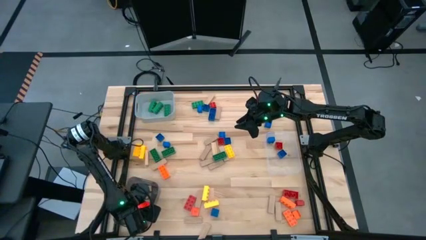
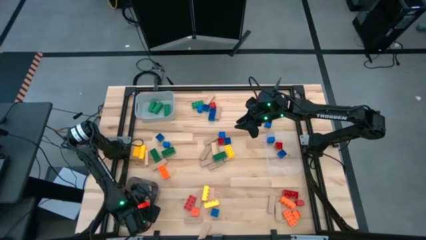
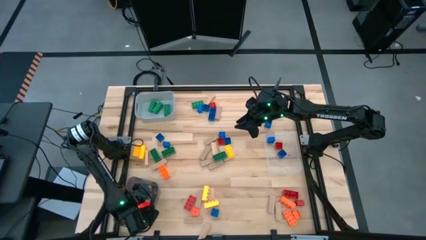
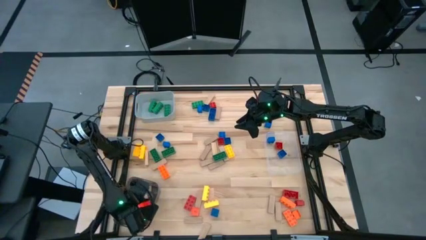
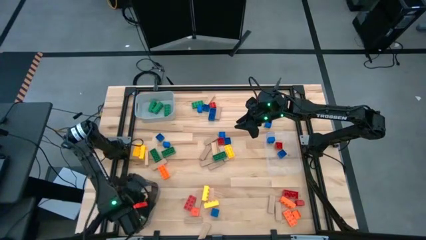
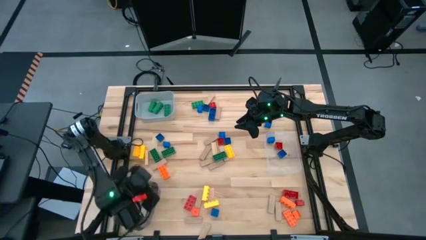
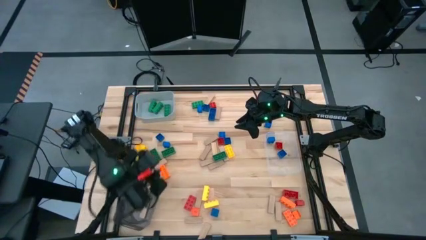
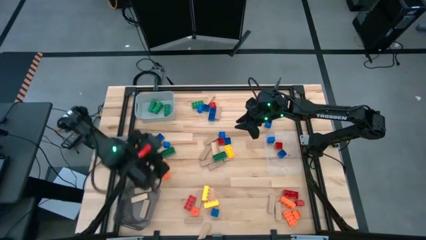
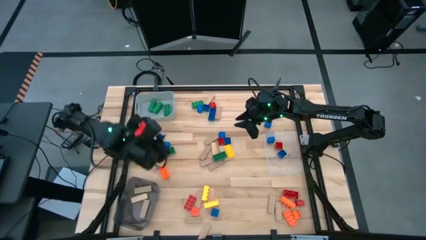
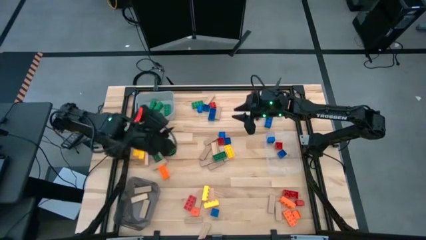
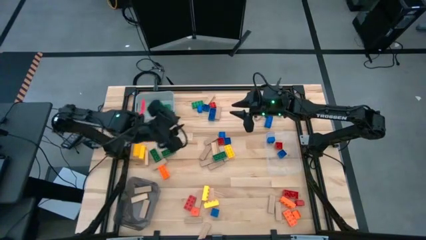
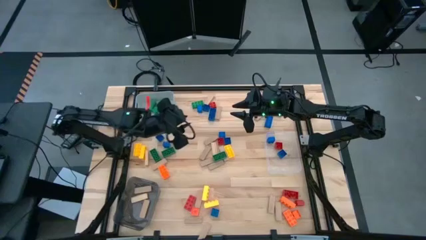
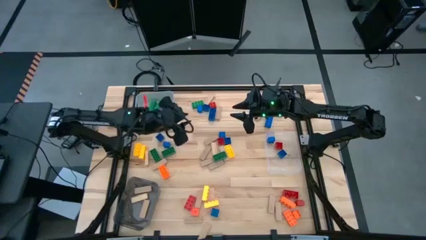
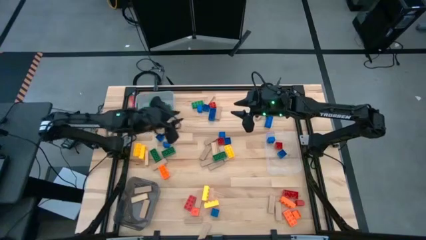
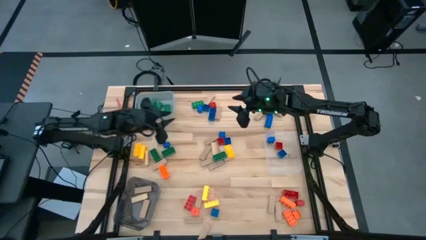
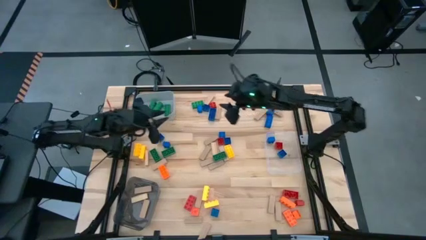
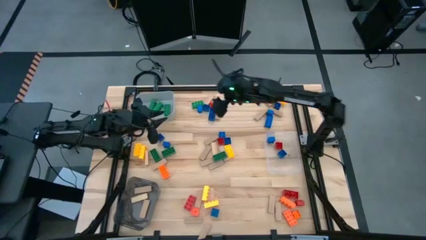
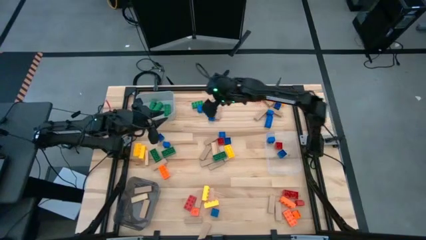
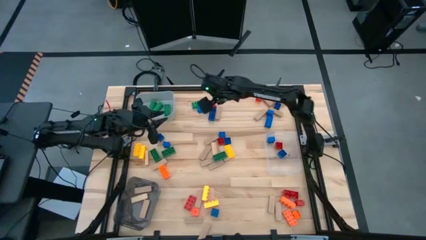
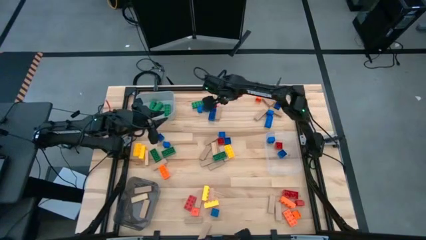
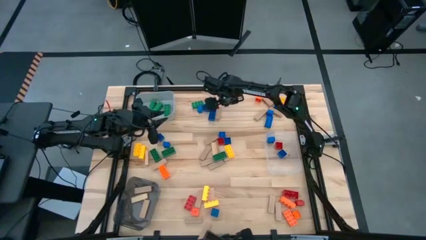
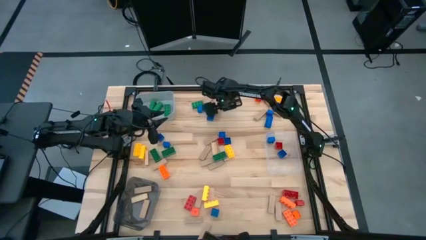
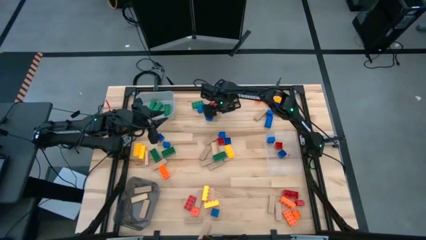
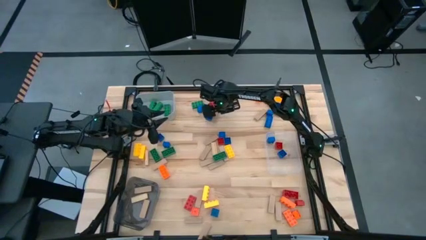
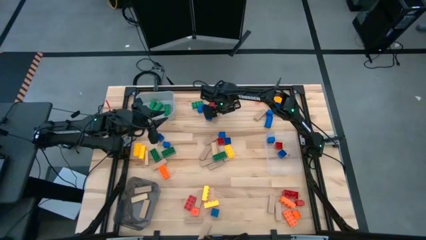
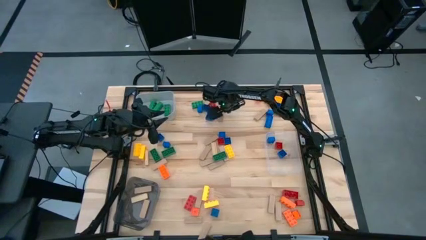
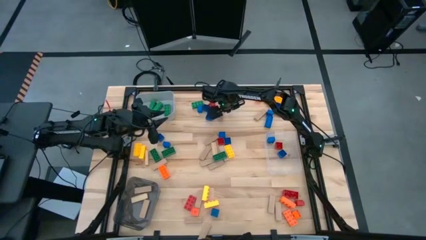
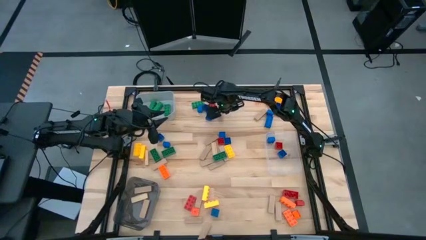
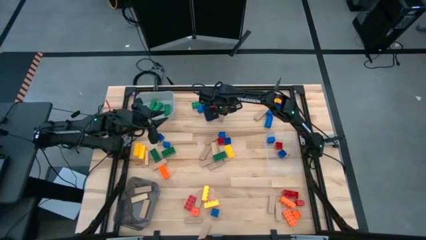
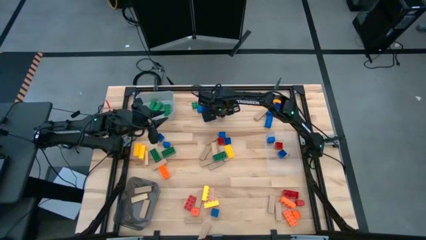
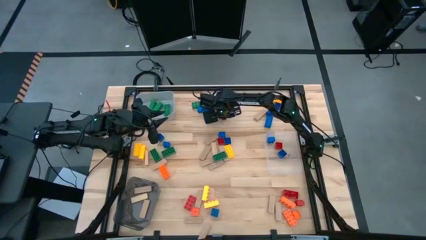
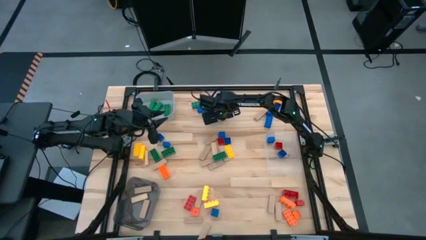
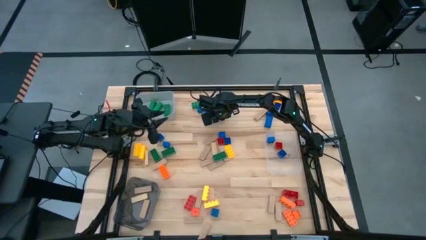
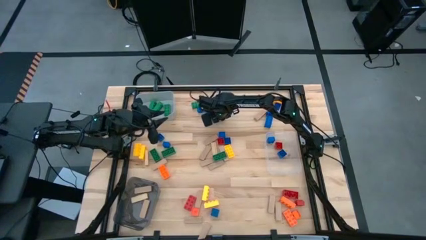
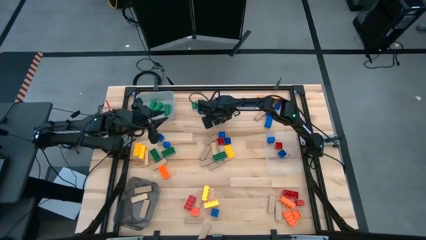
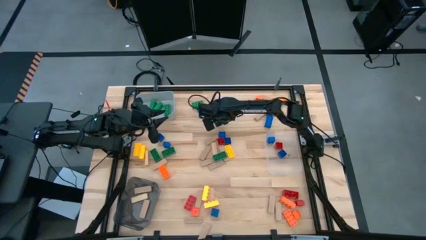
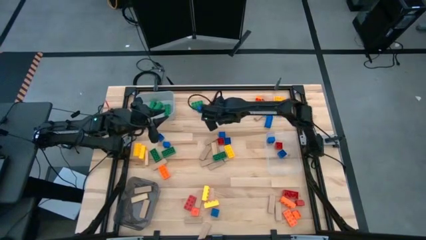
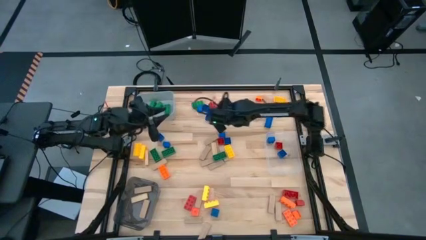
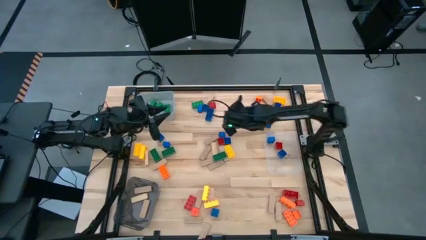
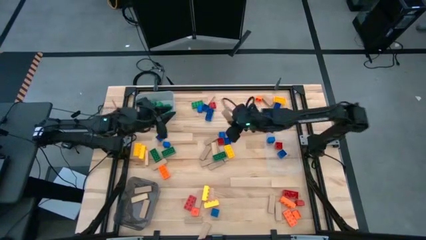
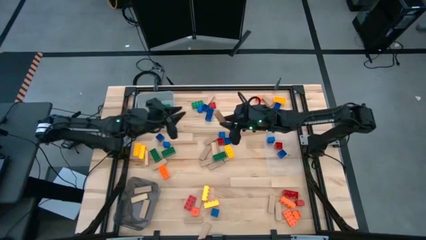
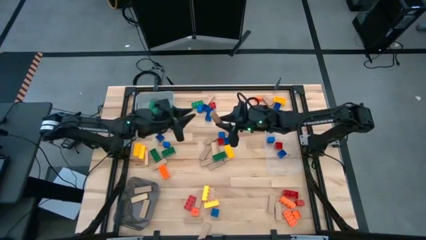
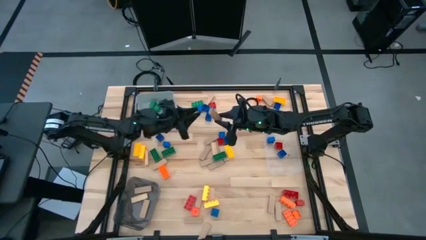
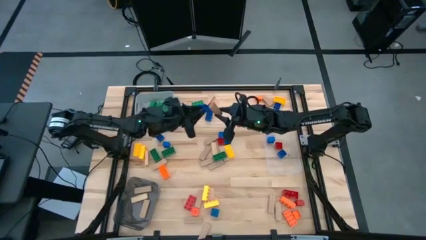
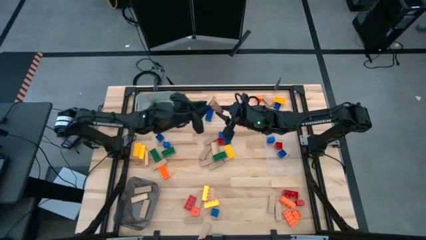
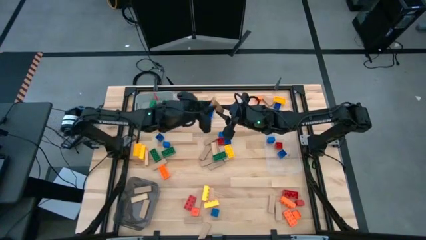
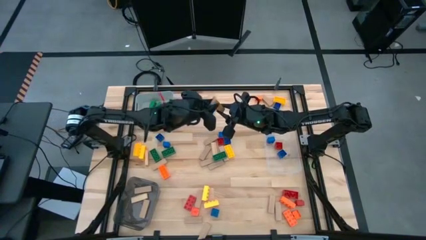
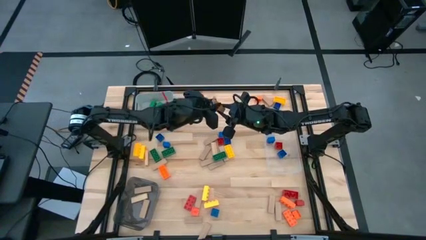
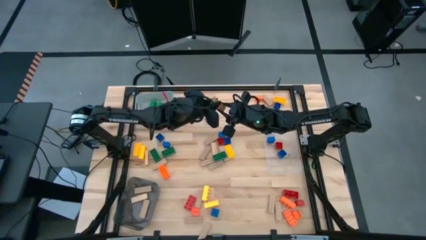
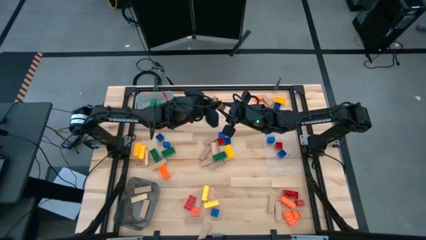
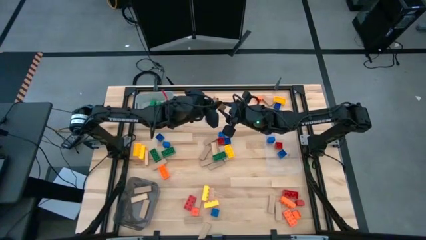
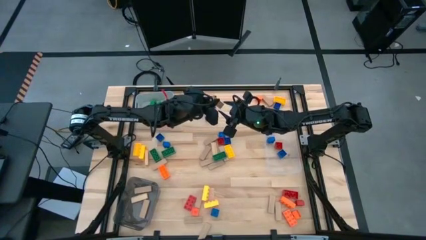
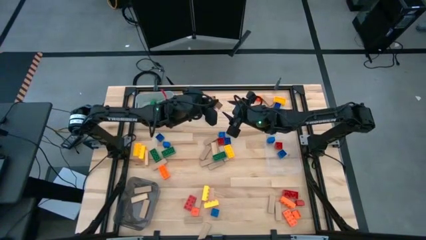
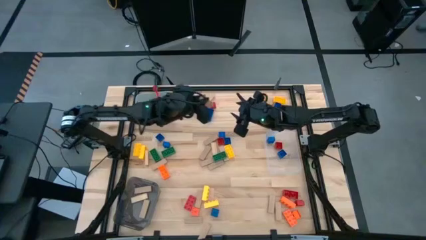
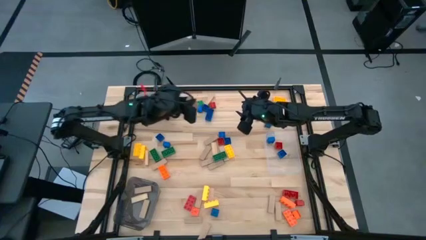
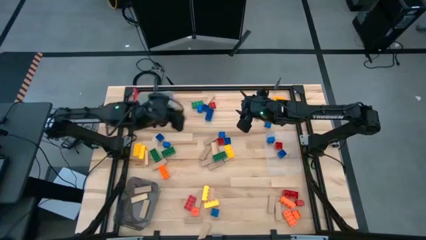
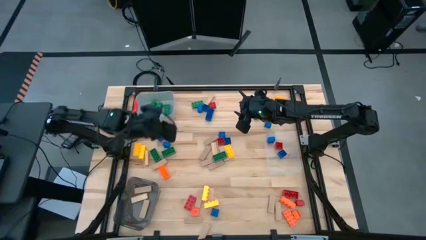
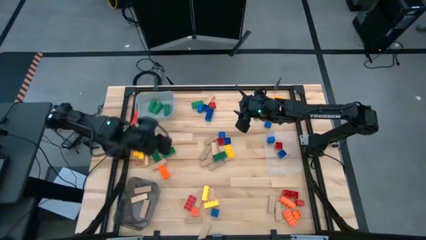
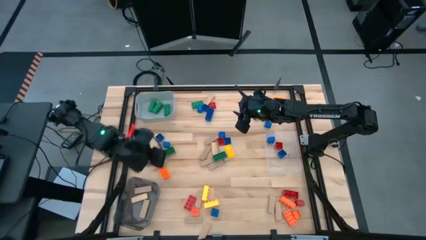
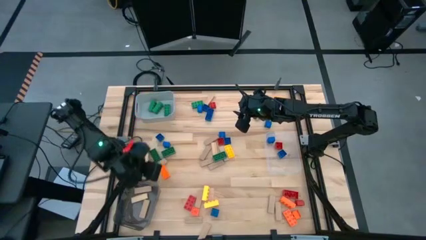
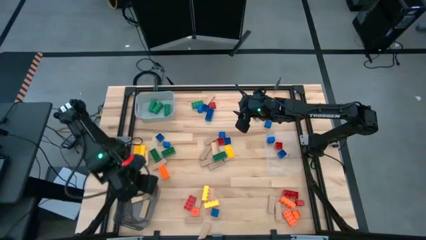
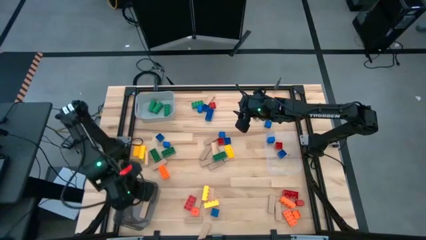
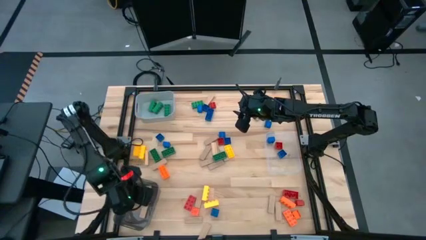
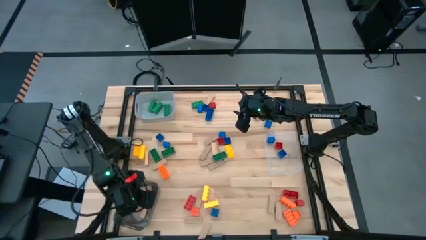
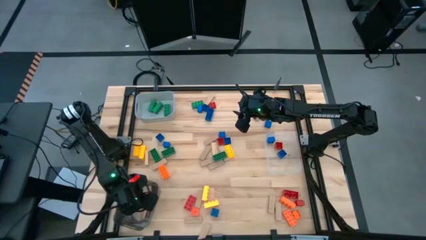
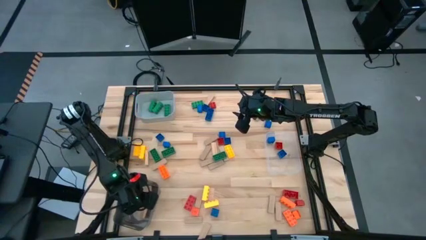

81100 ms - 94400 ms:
Task: Sort blocks by size
Put the brown block into the black bin

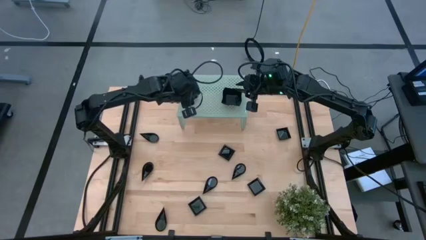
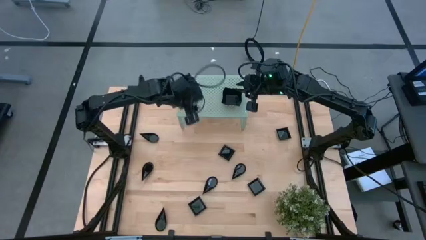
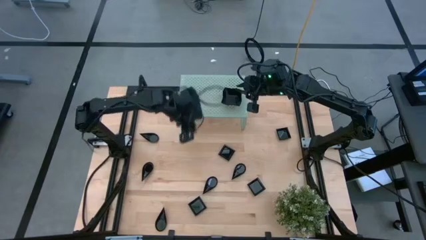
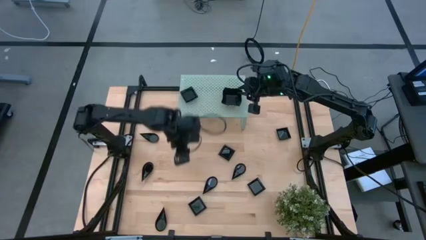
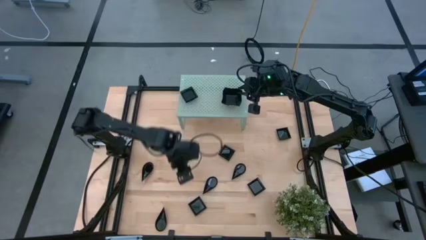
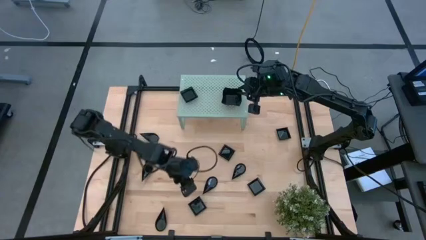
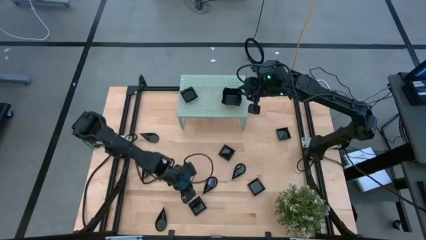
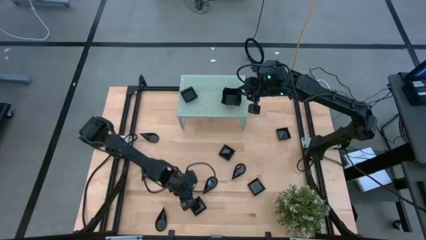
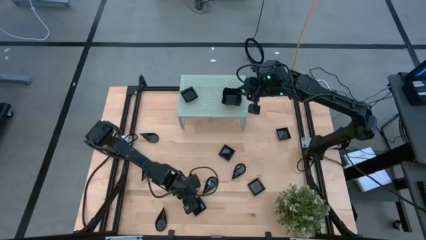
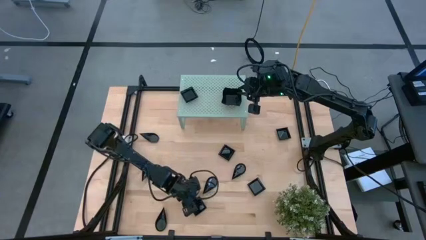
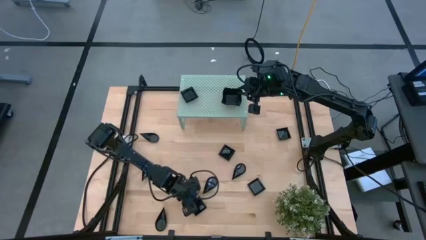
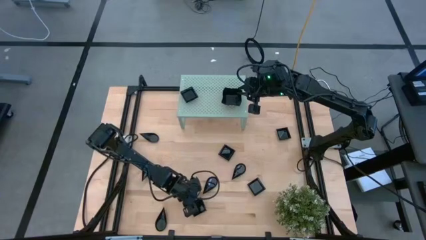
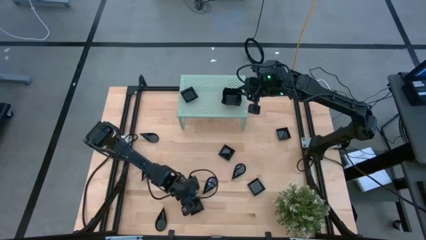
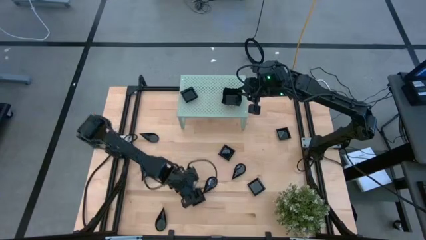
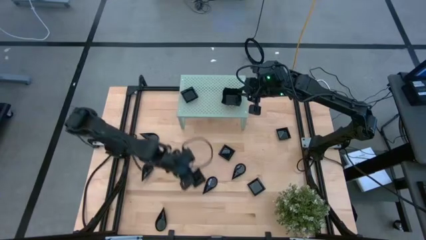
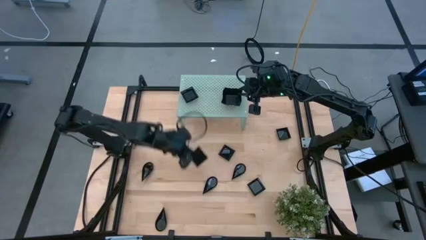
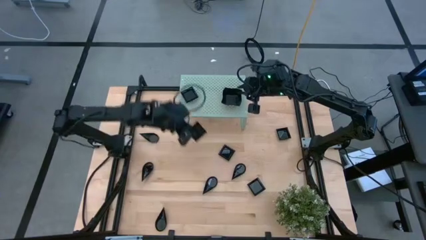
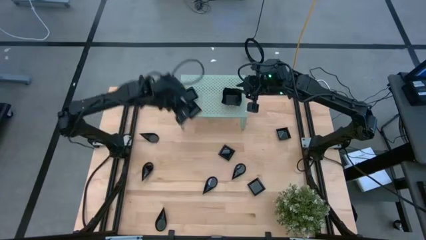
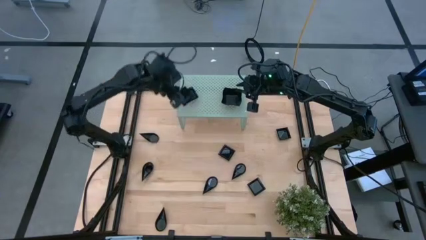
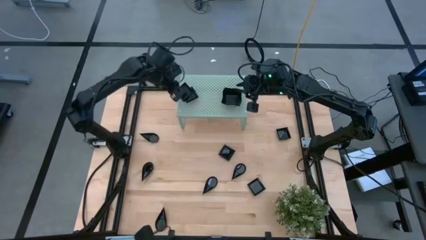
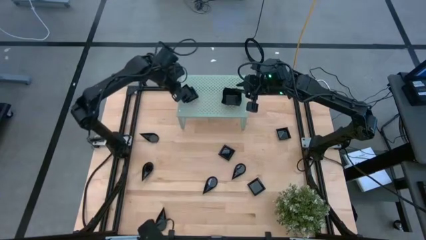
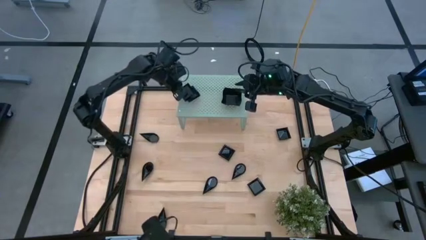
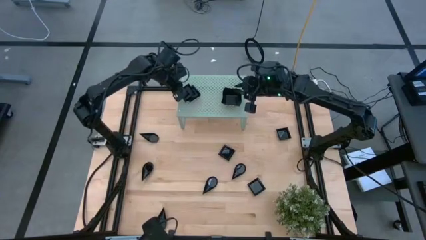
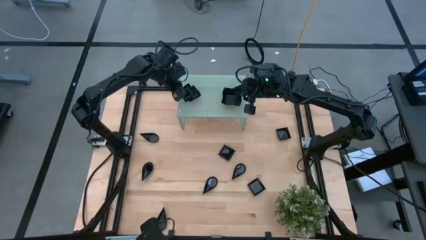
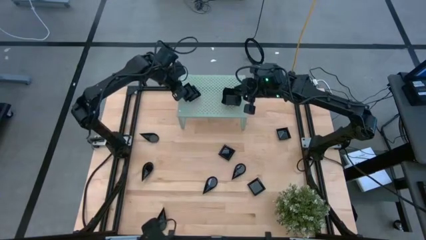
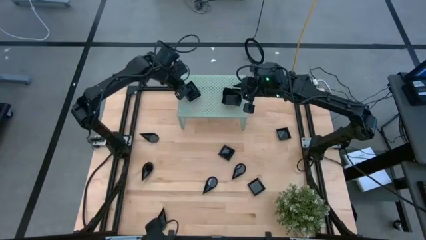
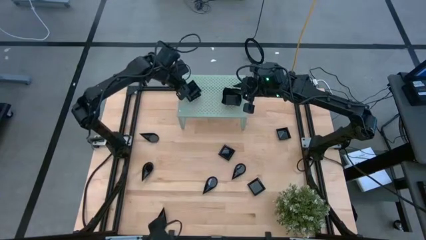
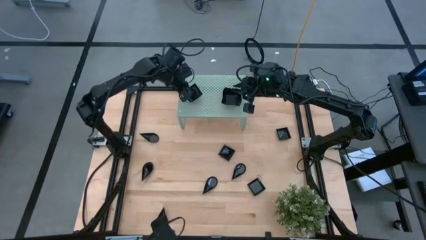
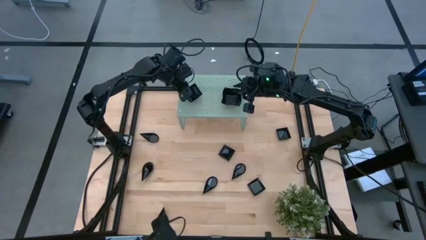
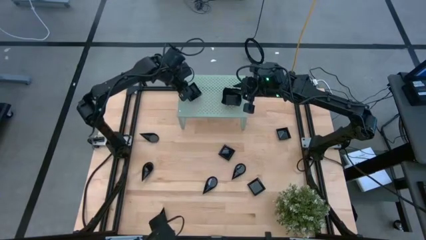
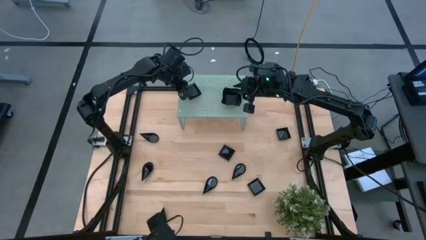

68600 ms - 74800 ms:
Task: Pick & Place Mini shaped plates
Stack the black square plate on top of the other black square plate on the shelf
